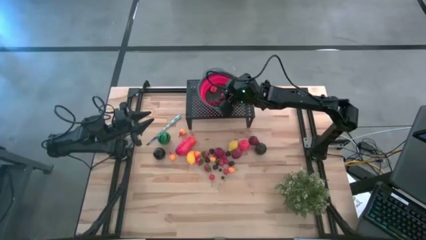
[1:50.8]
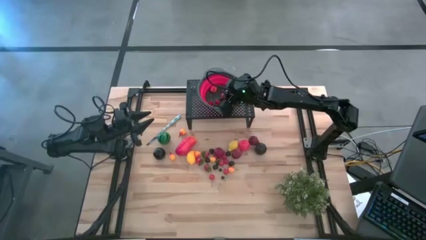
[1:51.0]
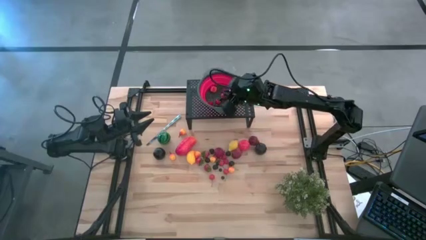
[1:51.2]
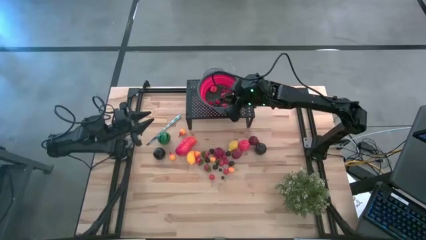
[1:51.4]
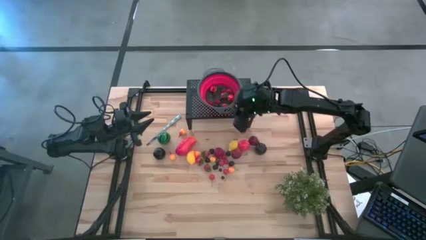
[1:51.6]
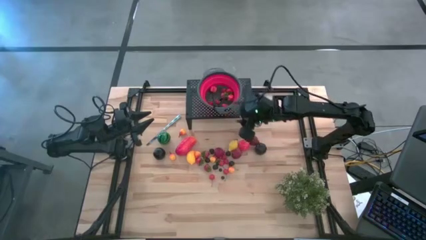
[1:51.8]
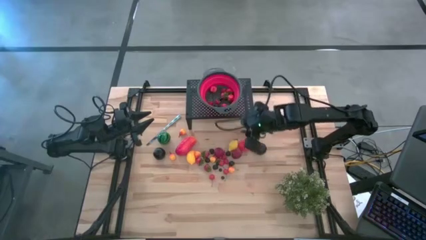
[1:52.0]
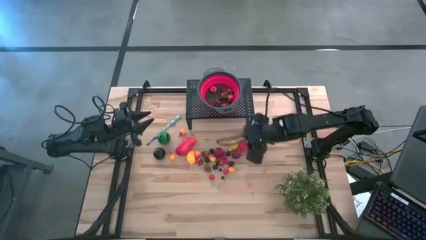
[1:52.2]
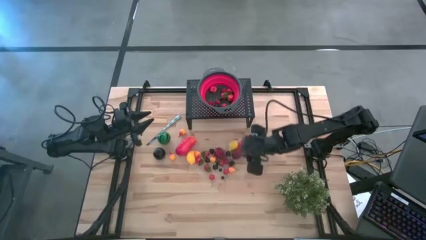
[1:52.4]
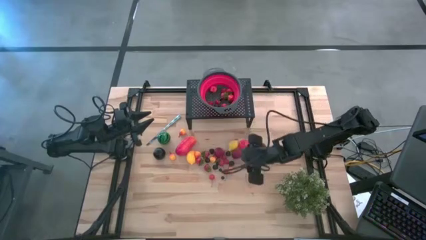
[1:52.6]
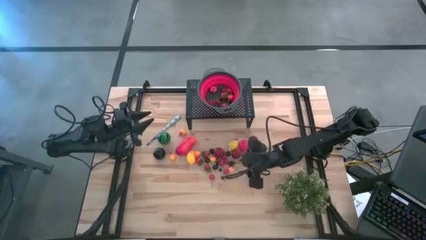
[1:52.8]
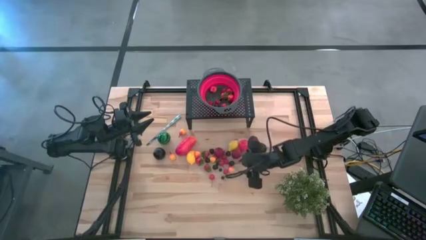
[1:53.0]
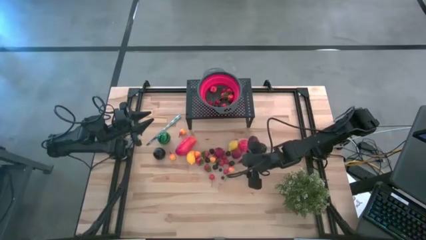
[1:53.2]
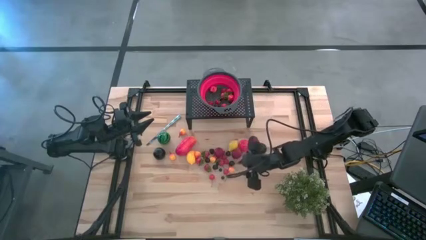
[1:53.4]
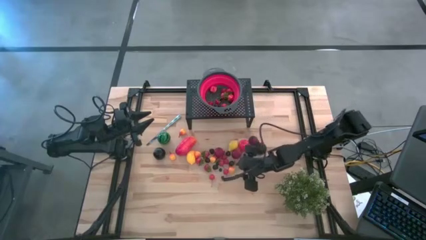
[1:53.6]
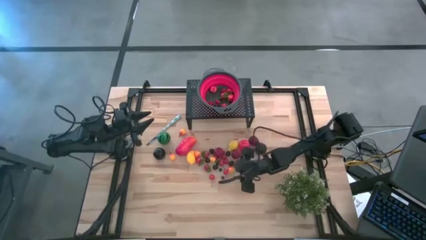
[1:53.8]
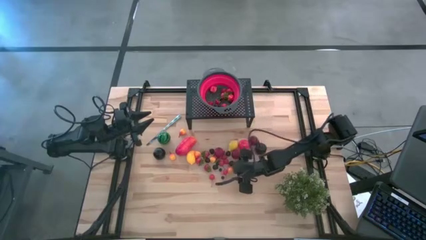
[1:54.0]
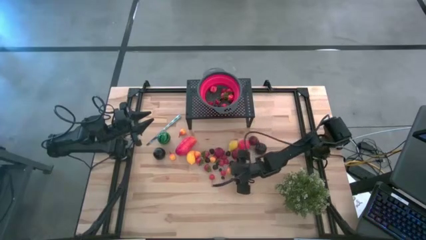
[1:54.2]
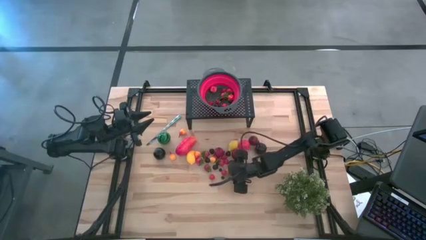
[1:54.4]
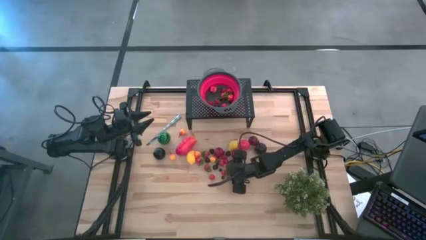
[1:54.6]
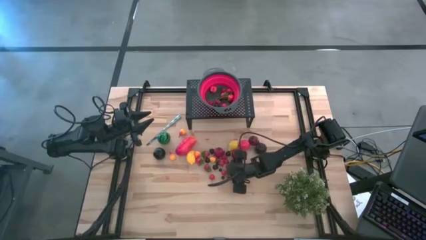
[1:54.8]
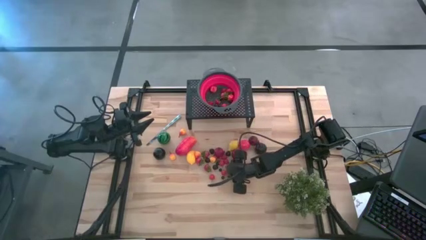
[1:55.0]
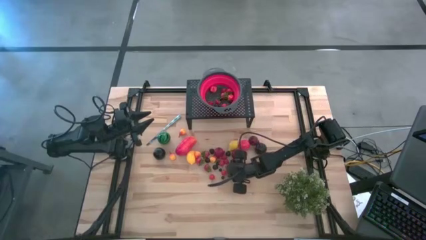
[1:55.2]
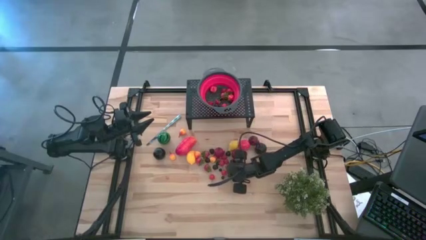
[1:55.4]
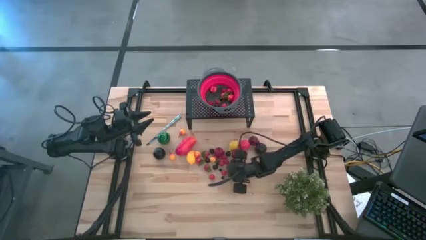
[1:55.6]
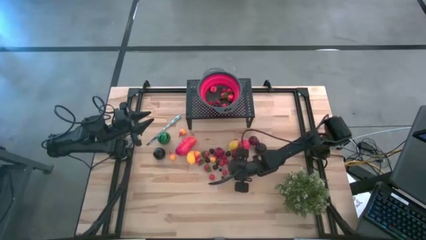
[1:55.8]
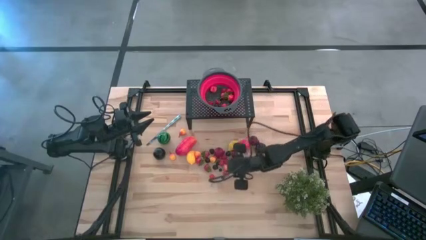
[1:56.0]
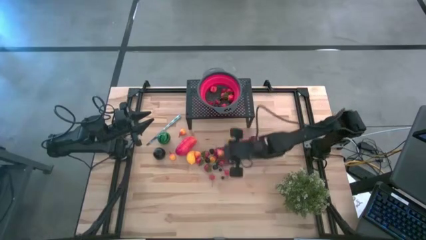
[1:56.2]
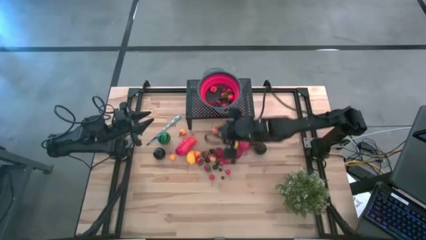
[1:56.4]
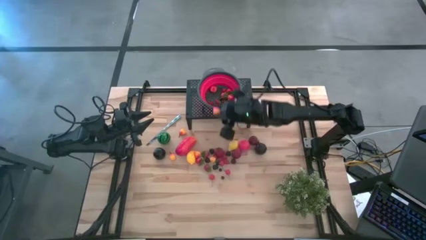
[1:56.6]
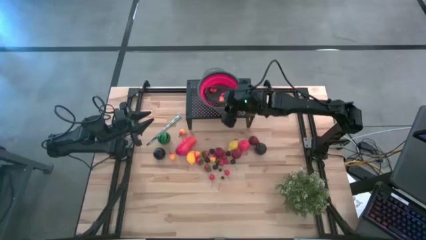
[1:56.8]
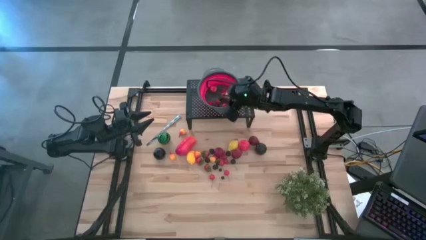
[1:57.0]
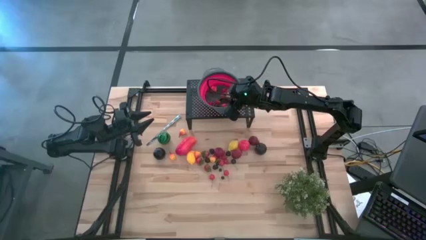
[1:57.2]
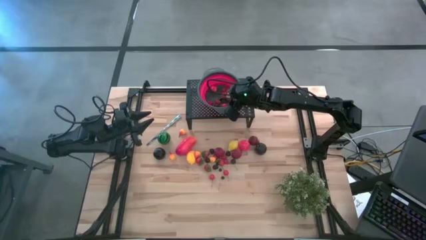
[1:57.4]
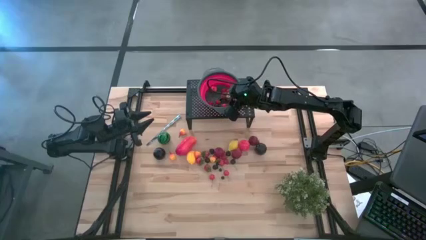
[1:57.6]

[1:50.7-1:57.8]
Task: Pick & Place Fruit
Put the peach in the red colander on the shelf

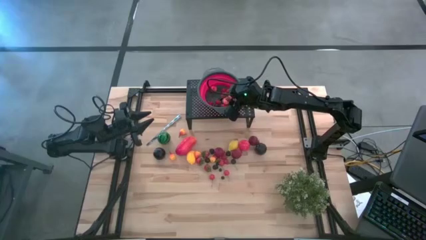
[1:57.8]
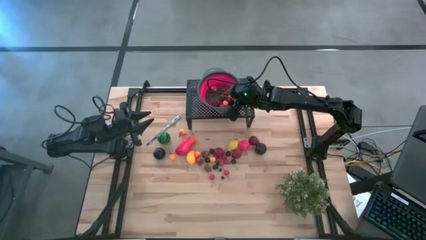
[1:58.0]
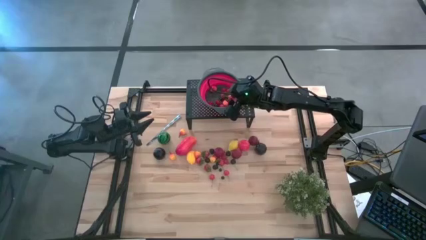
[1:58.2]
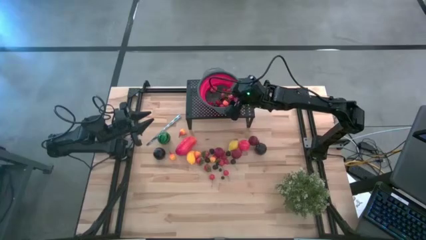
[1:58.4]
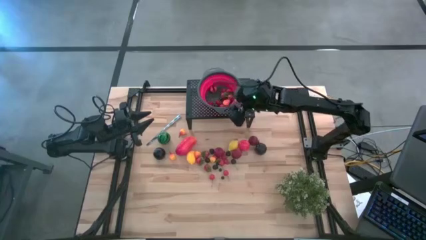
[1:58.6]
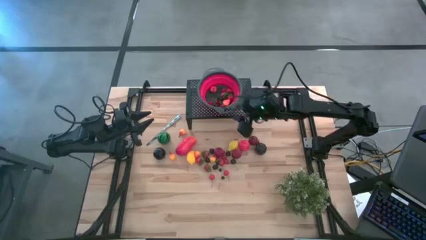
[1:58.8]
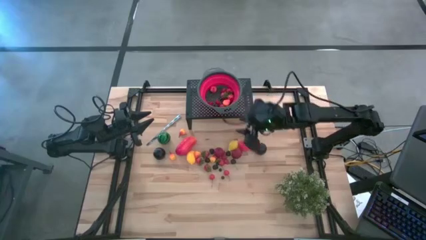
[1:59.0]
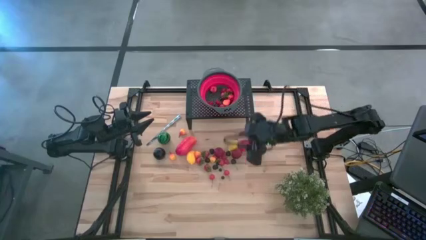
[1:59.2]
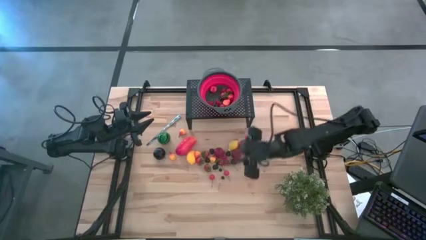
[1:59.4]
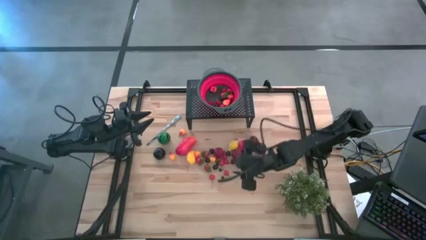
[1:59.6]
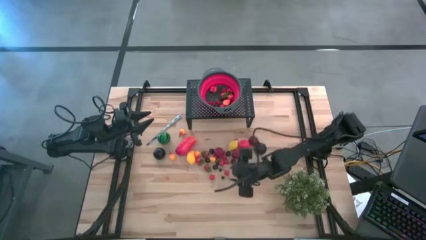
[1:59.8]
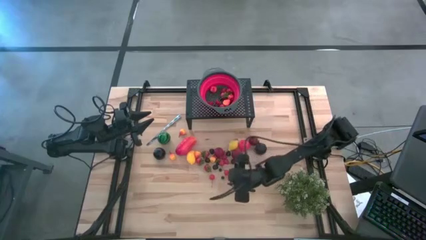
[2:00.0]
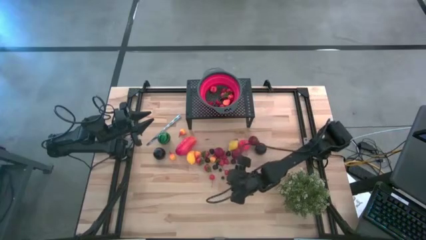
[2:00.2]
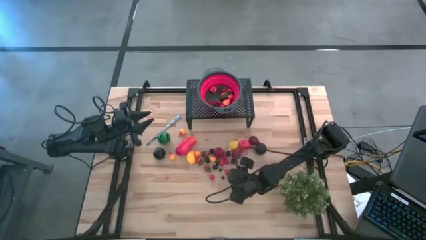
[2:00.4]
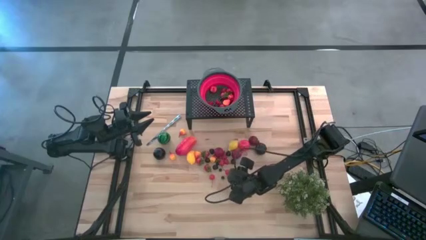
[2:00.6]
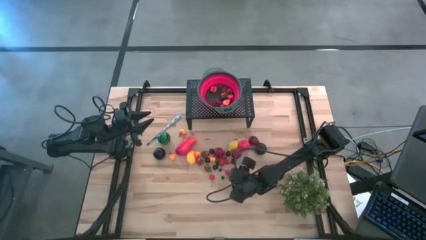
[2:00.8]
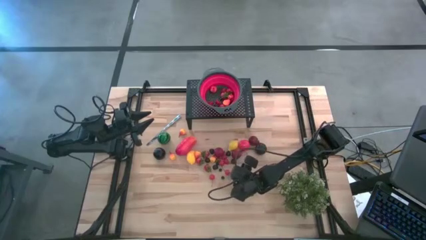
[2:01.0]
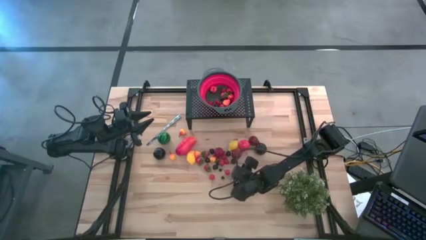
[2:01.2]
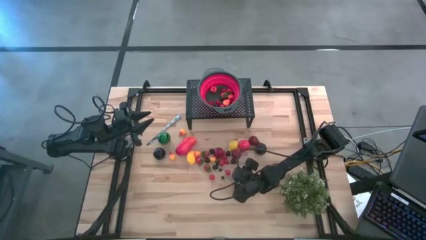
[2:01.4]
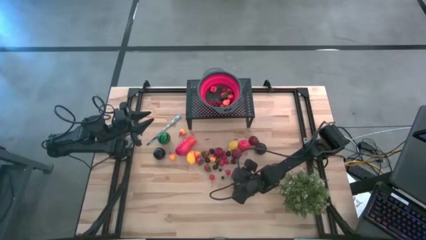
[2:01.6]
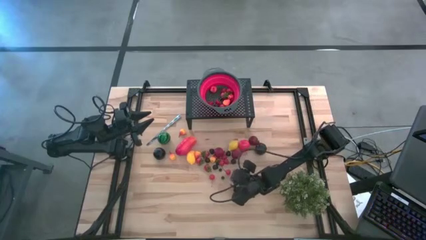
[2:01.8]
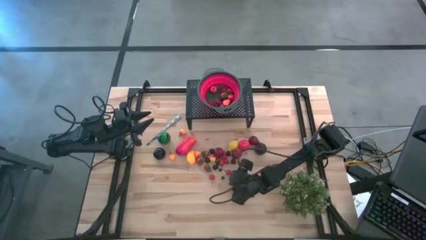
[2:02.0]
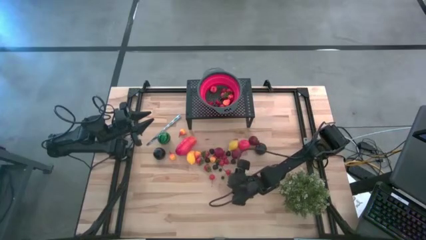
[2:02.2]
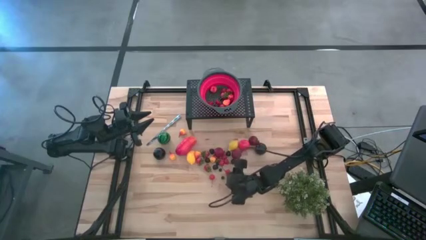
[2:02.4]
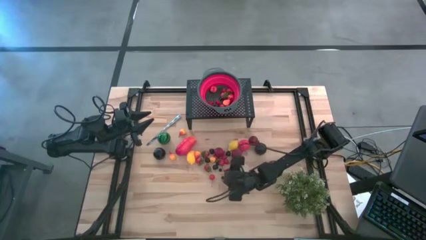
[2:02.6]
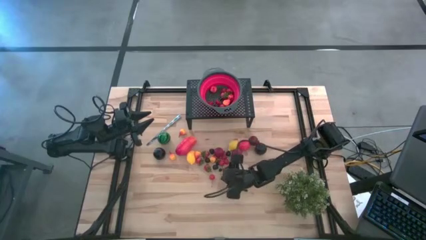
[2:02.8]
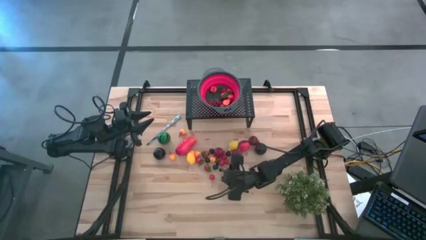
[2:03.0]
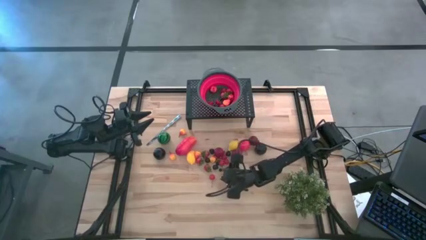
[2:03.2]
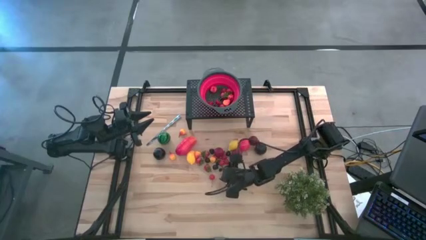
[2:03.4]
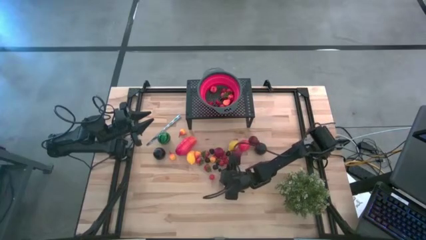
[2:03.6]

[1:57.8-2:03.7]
Put the red cherry in the red colander on the shelf

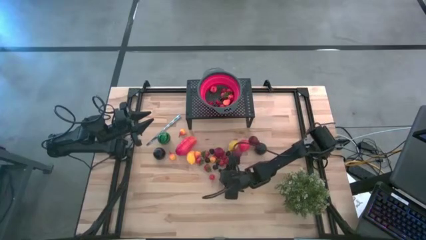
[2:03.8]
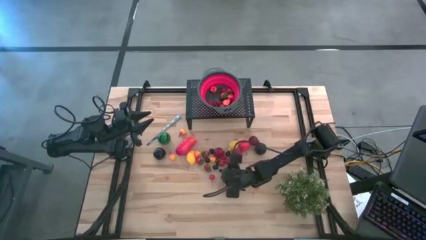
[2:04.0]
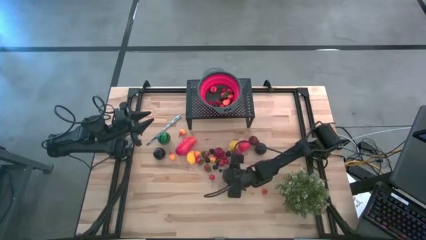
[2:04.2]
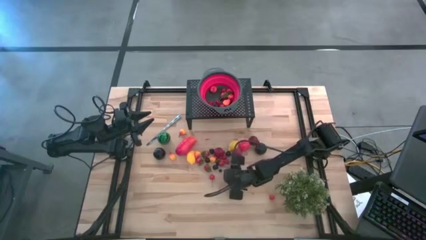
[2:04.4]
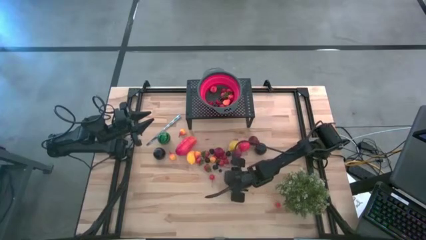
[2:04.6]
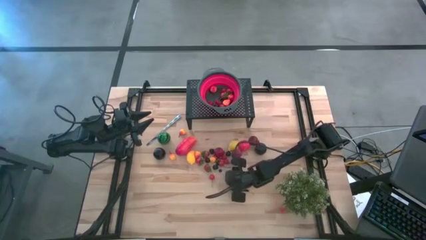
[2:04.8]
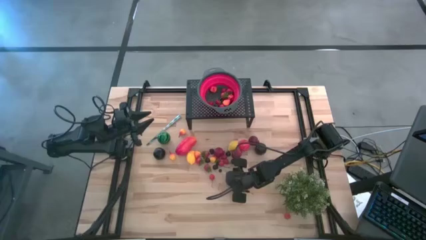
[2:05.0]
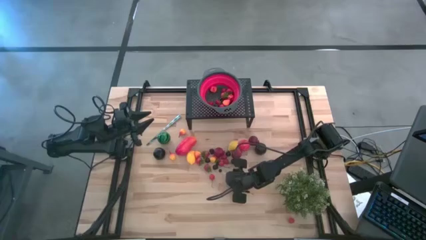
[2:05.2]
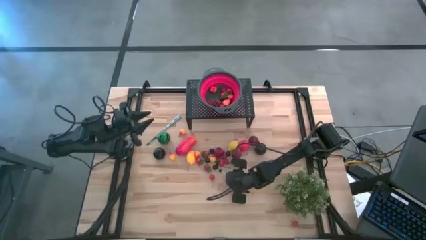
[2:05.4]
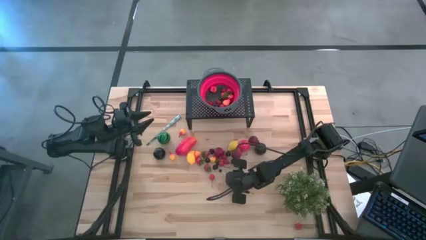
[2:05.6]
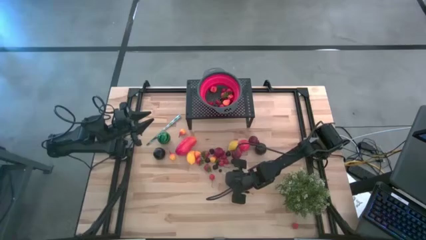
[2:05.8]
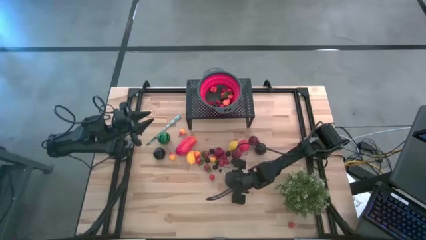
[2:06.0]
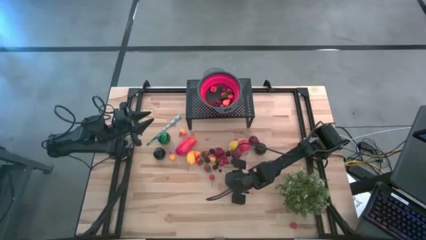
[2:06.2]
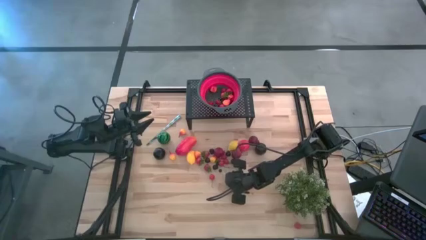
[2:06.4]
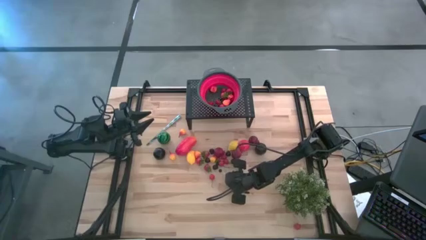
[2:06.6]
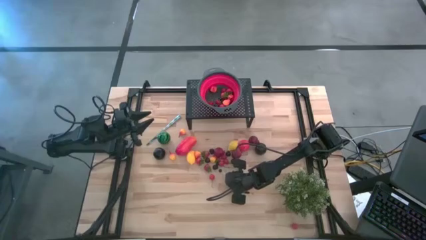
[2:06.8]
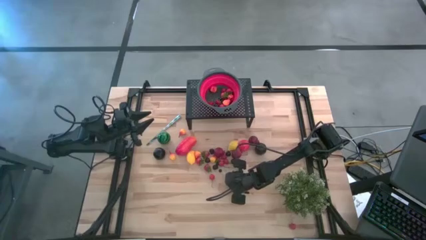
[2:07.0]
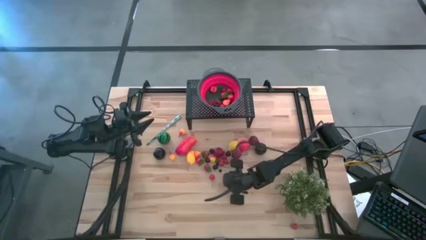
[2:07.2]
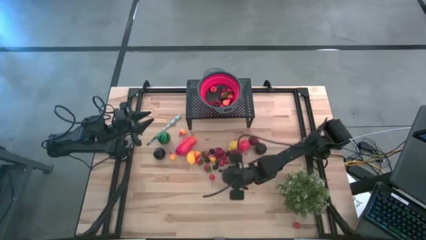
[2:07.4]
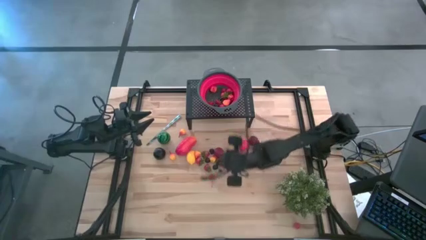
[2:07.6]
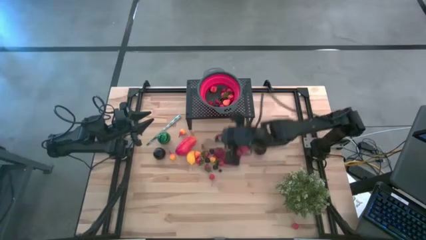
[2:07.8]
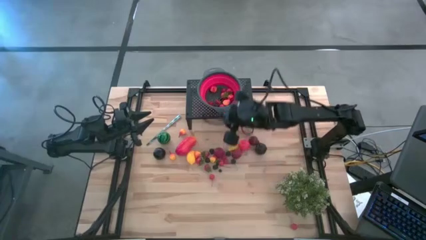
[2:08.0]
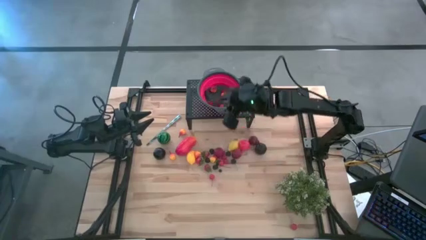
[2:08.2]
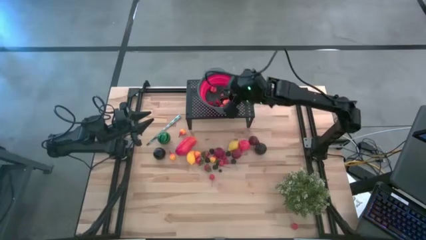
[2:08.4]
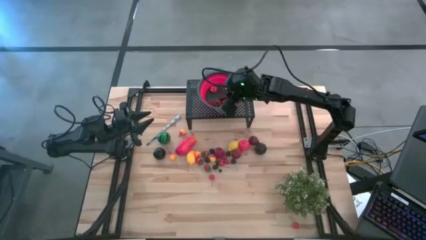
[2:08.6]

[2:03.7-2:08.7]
Put the blueberry in the red colander on the shelf
